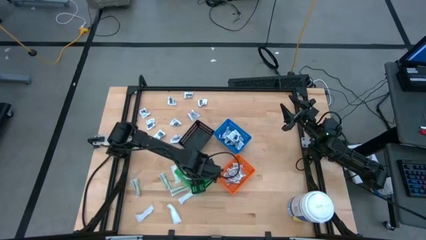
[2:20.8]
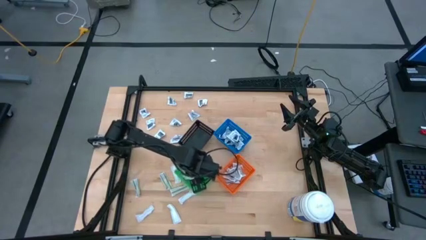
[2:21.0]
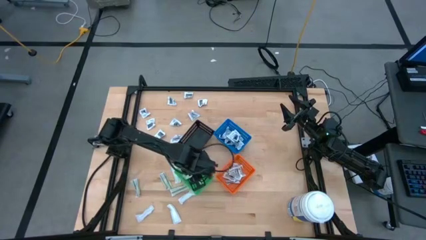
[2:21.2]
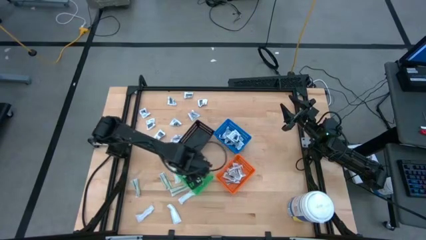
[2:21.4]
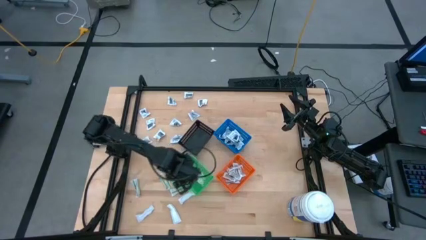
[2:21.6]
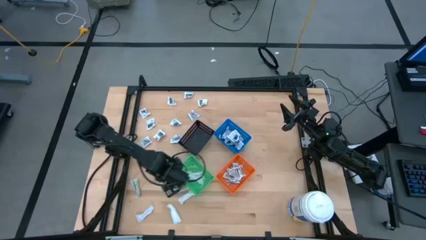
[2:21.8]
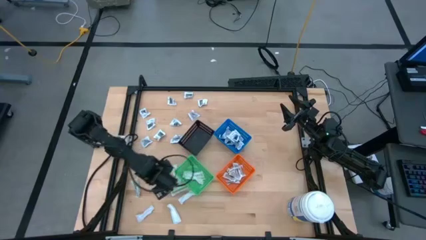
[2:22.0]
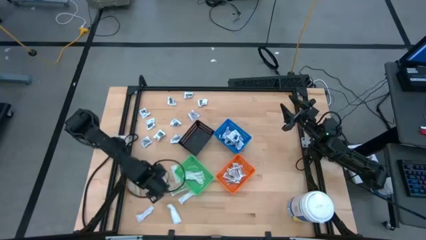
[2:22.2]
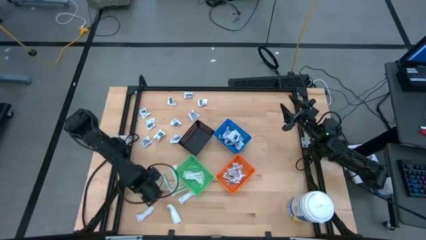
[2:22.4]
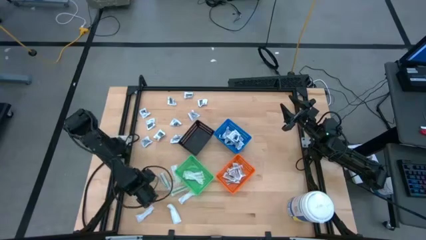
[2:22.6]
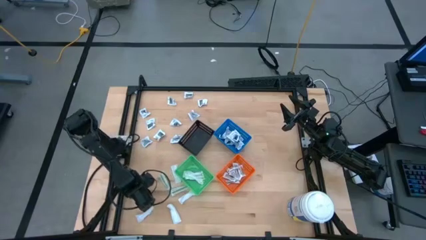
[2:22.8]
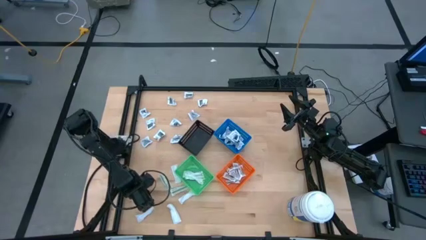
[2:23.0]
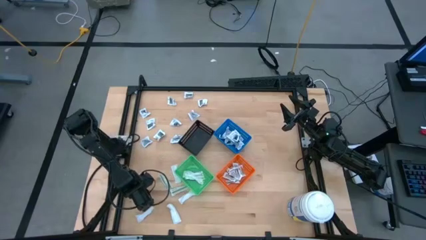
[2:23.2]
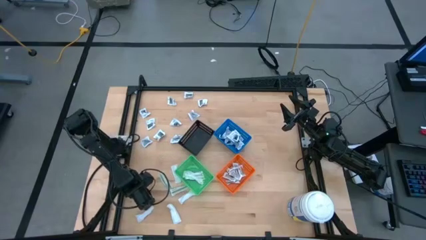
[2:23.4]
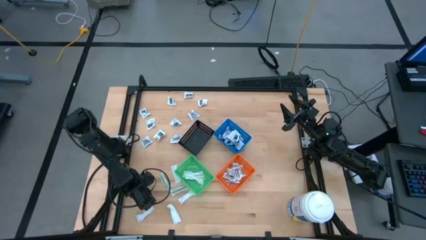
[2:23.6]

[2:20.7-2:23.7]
Task: Pick & Place First Aid Supplies
Put the green bandage into the green bin

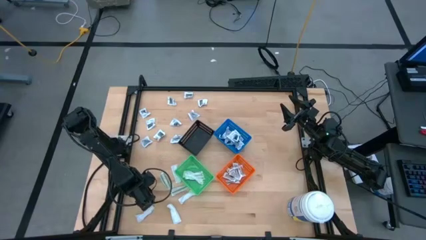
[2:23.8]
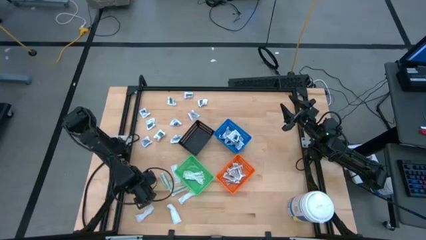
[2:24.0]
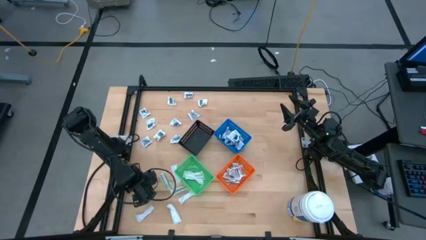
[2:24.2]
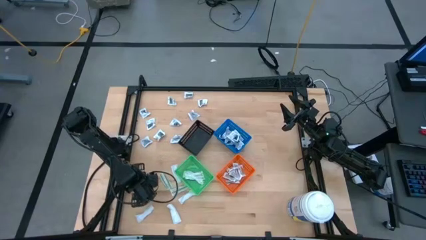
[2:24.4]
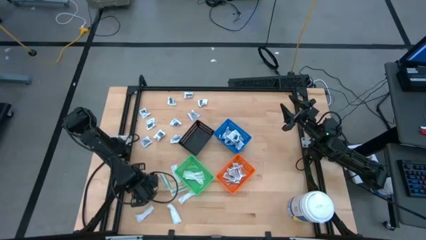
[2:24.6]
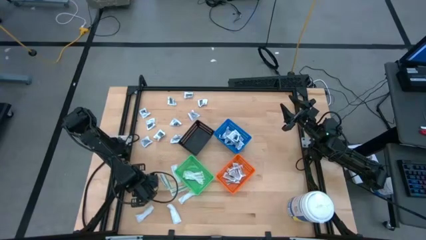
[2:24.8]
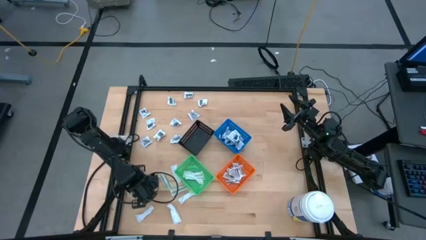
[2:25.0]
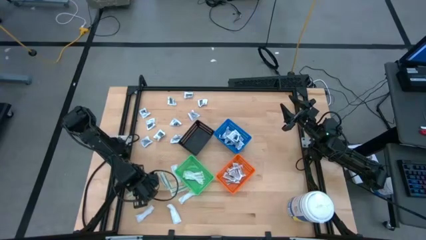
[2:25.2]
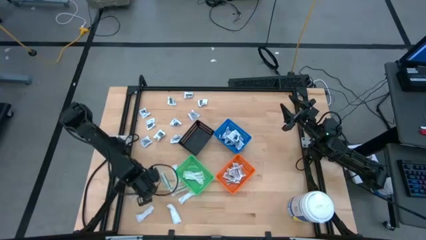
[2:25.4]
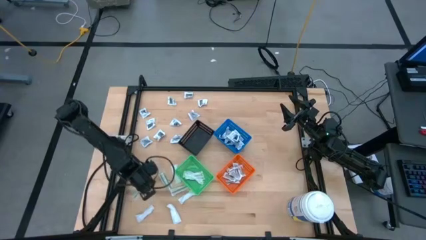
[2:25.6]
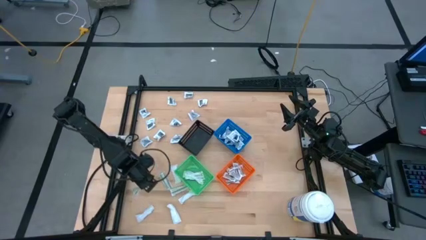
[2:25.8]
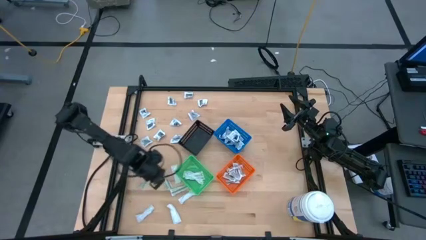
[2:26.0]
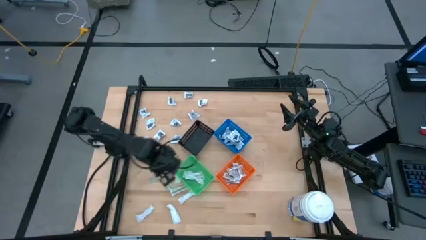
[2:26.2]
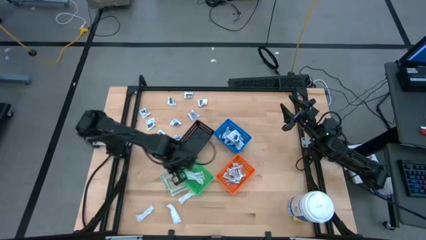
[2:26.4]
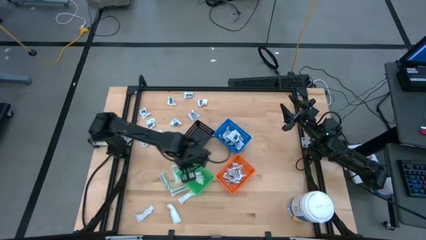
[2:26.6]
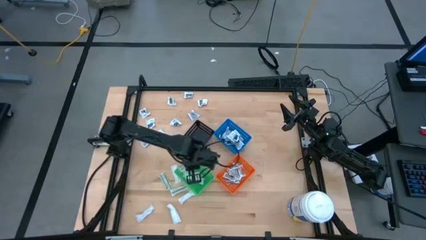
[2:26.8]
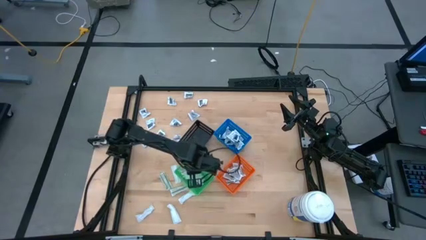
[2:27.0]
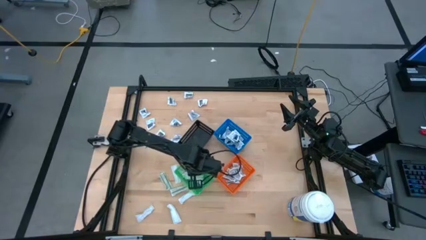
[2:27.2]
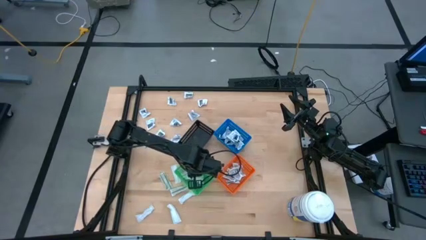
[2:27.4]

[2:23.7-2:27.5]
Put the green bandage into the green bin

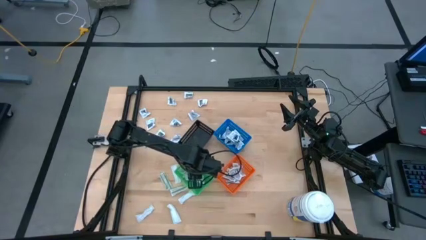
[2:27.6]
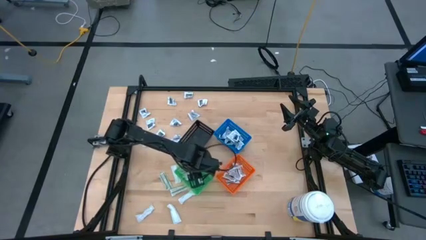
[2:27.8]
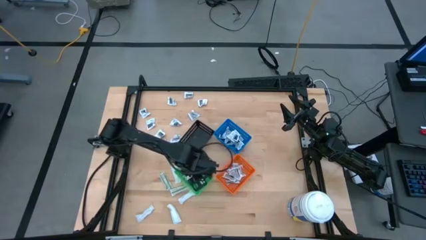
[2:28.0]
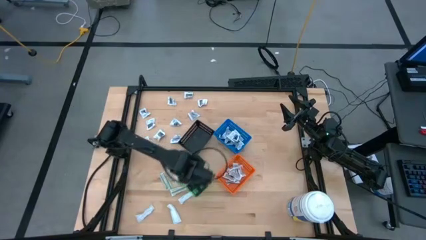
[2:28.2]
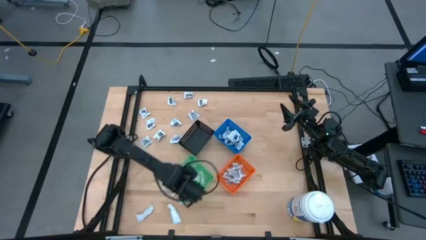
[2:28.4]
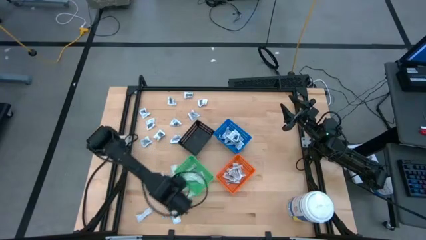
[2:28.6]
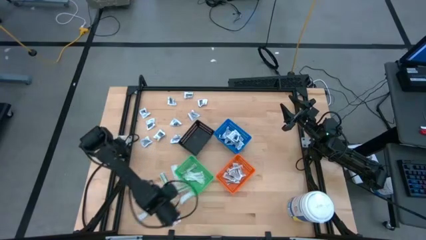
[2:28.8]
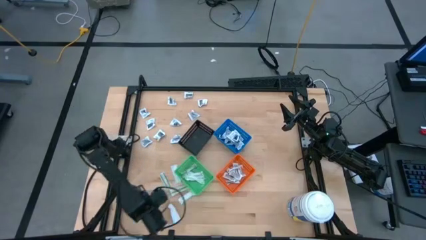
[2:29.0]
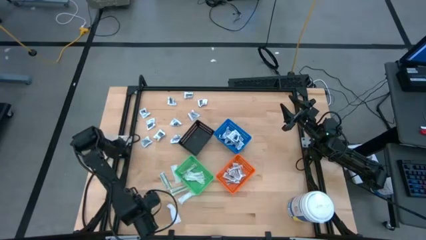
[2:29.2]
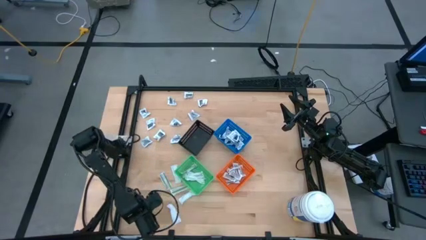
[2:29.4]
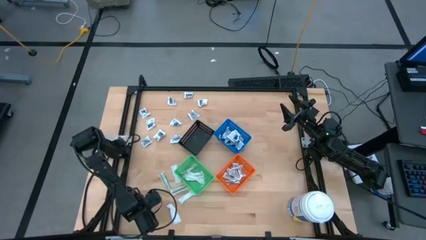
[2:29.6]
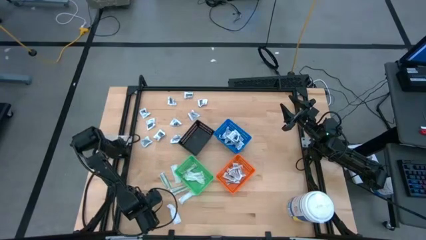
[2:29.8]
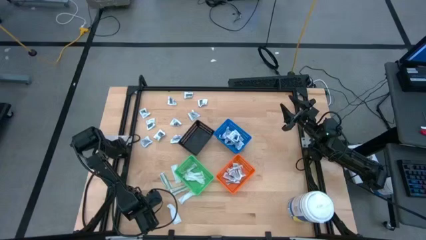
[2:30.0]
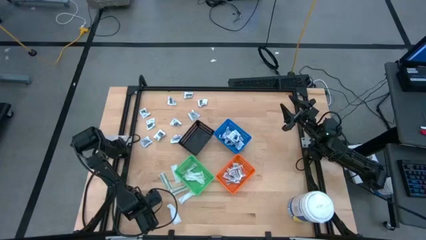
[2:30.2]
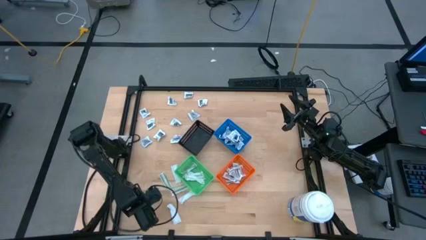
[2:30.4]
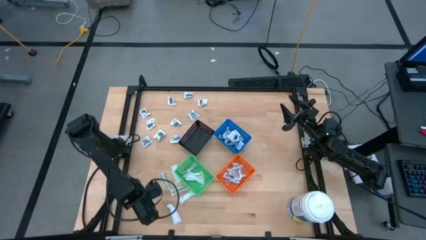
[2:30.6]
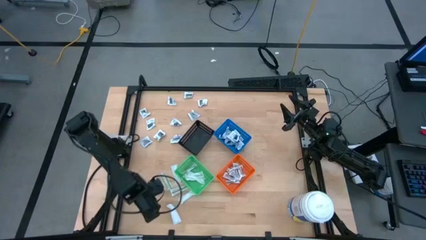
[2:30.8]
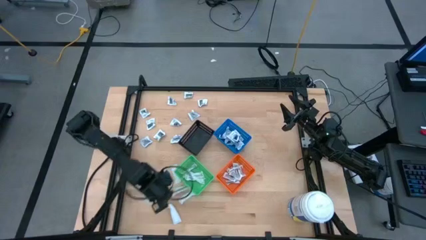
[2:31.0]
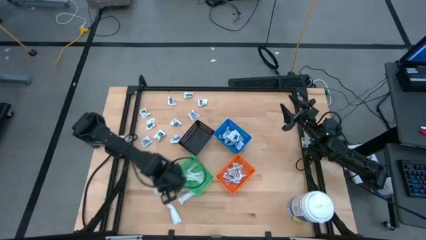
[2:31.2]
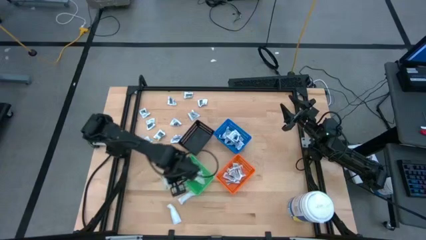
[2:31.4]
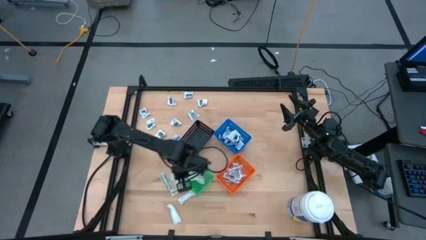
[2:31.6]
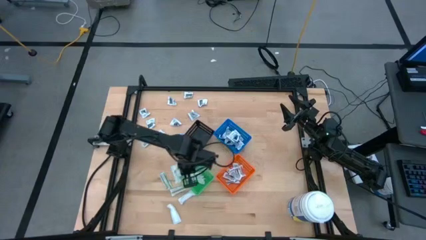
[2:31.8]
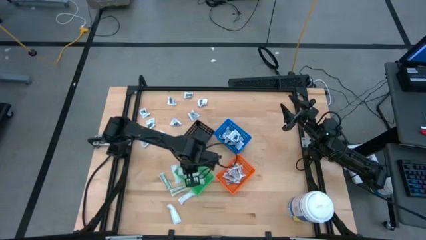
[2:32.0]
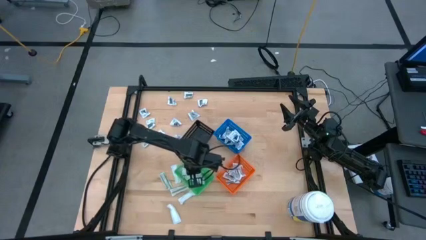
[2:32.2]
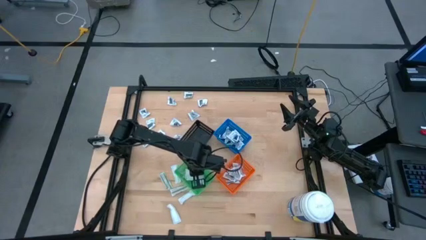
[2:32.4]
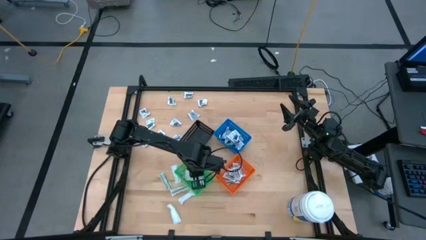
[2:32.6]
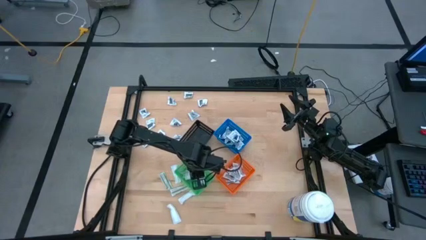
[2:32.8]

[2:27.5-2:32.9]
Put the green bandage into the green bin

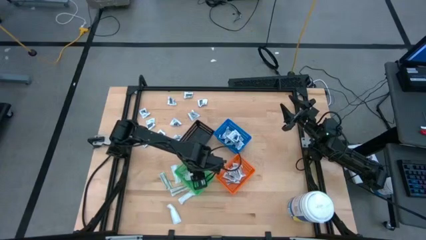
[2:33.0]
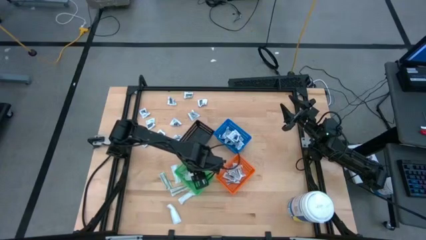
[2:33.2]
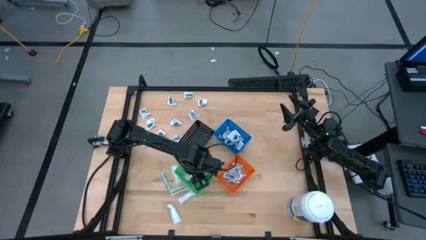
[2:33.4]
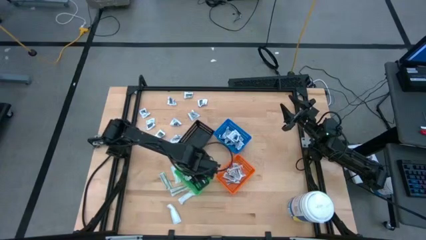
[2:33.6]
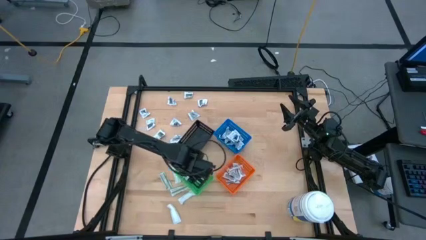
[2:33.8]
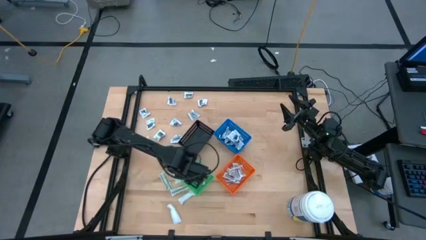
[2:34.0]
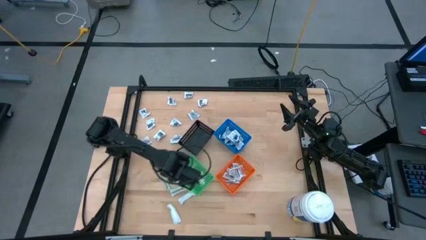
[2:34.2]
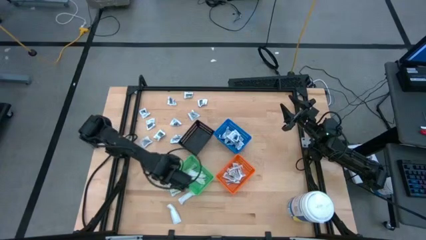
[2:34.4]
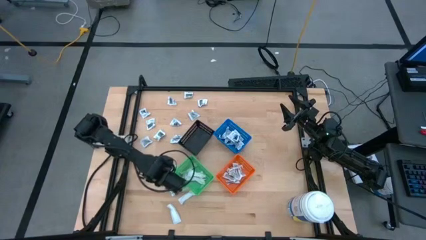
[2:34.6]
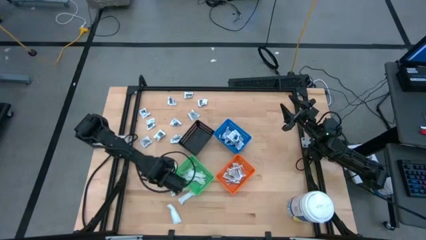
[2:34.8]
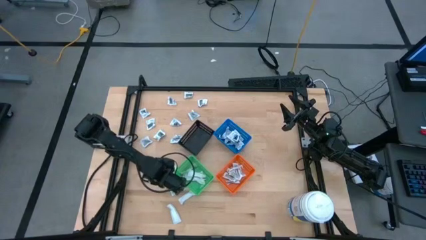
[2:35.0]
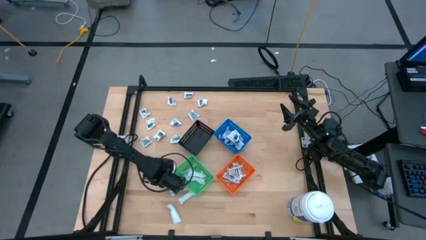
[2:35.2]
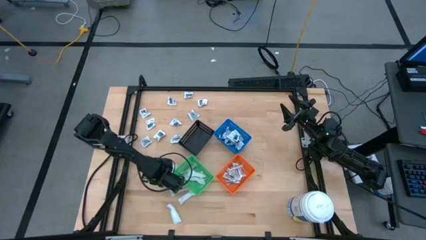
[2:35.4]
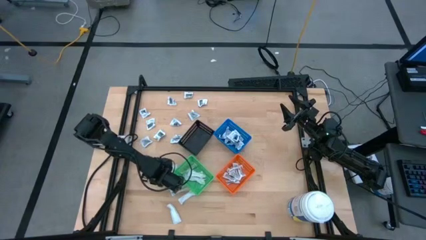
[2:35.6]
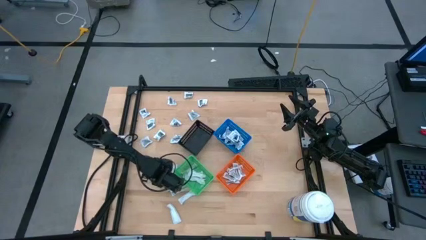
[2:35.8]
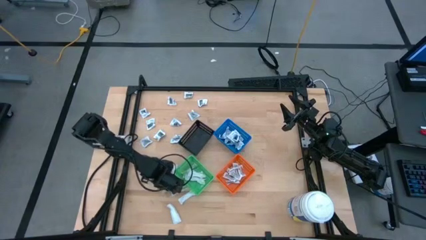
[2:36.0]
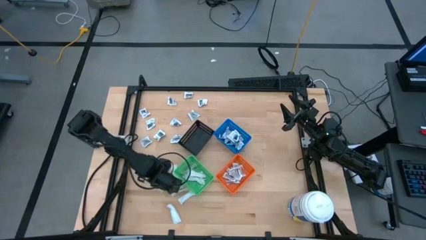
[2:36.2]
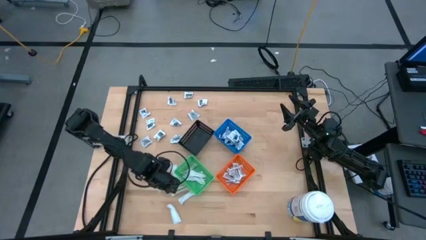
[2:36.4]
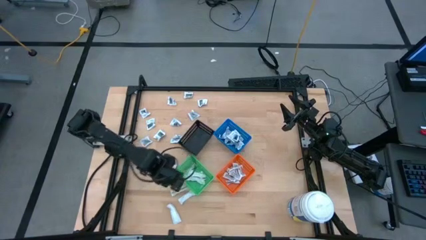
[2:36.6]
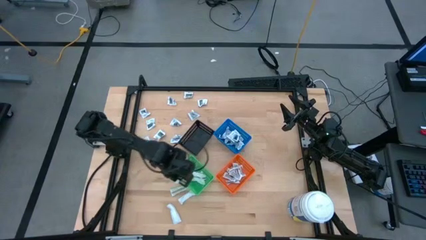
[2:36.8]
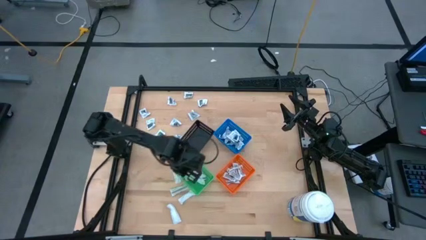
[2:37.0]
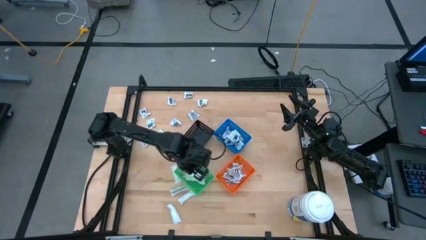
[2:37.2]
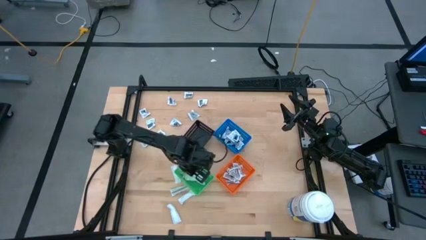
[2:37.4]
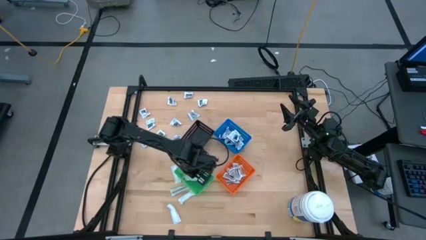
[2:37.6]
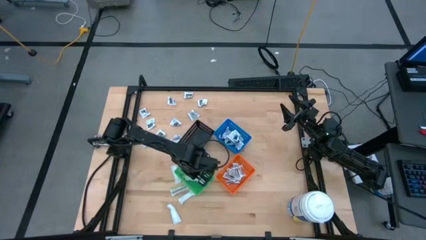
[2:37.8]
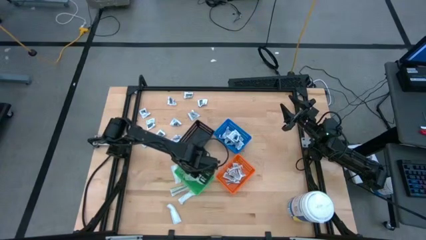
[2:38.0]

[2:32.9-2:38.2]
Put the green bandage into the green bin
